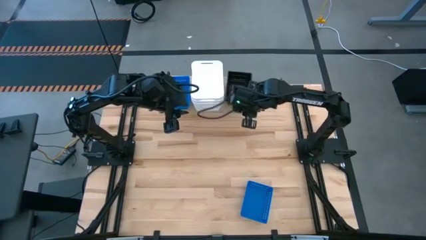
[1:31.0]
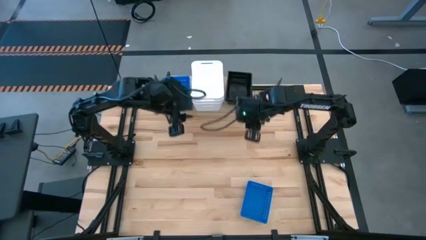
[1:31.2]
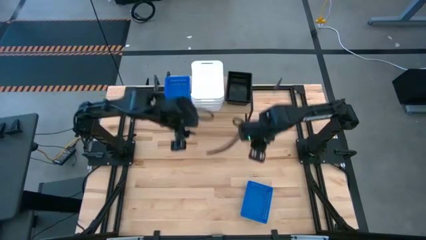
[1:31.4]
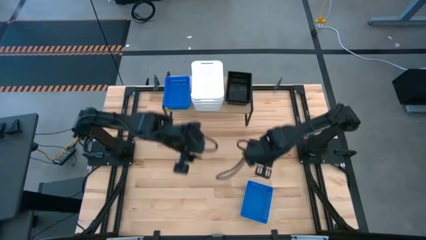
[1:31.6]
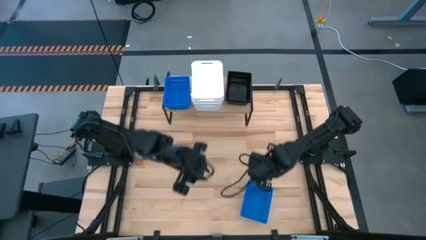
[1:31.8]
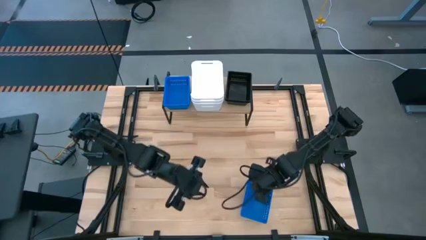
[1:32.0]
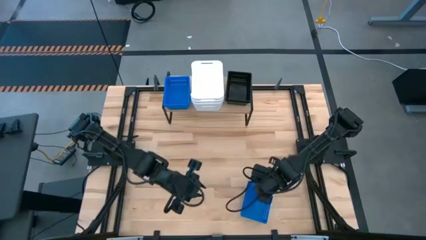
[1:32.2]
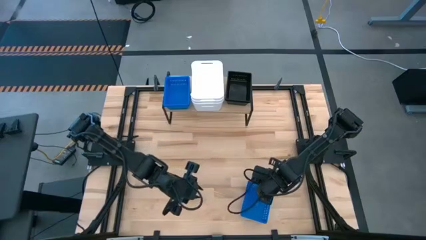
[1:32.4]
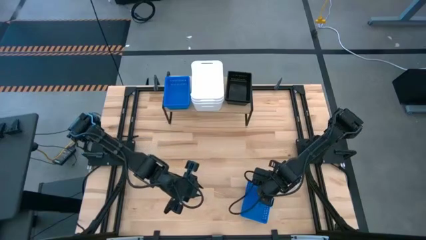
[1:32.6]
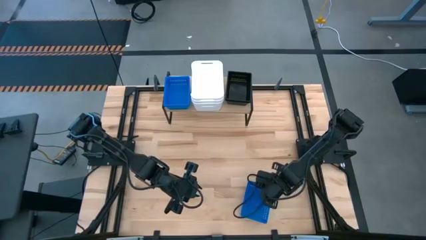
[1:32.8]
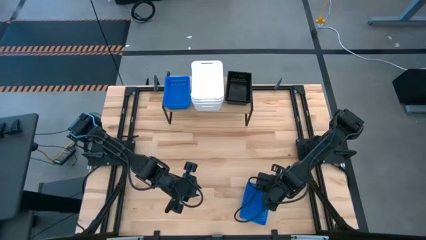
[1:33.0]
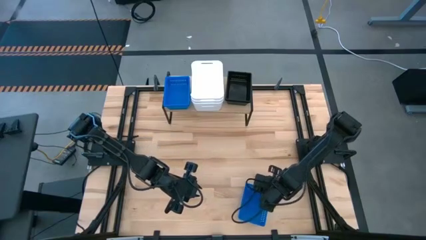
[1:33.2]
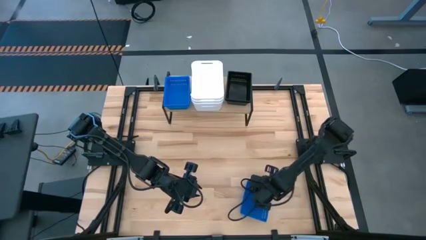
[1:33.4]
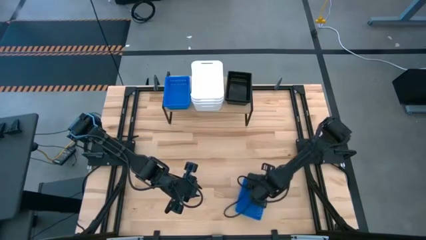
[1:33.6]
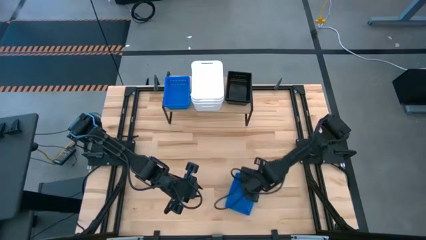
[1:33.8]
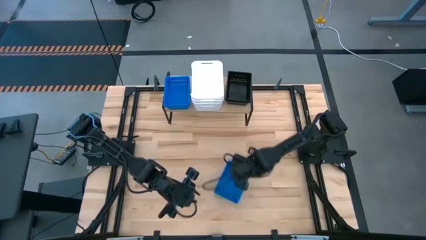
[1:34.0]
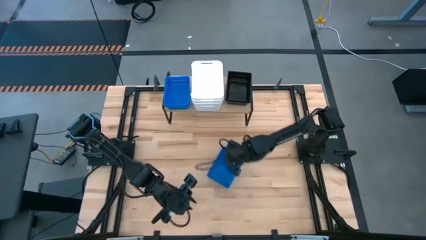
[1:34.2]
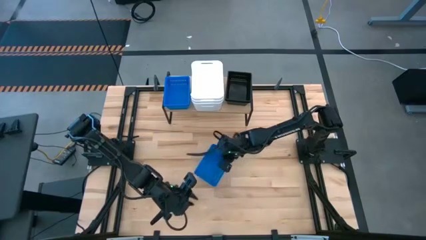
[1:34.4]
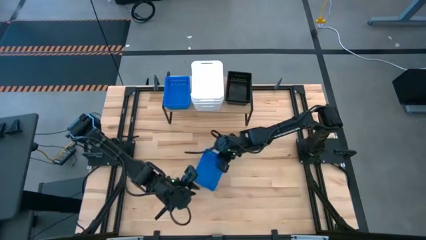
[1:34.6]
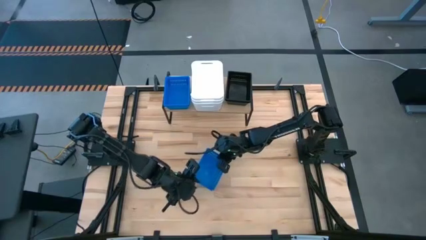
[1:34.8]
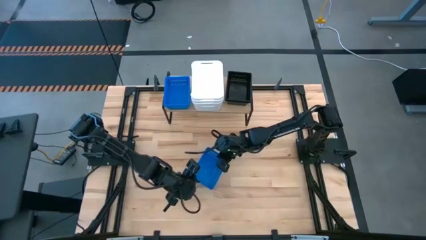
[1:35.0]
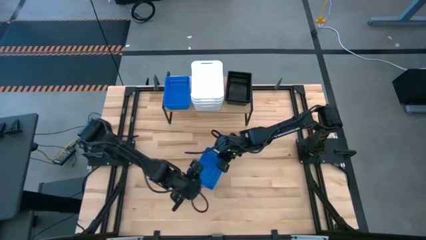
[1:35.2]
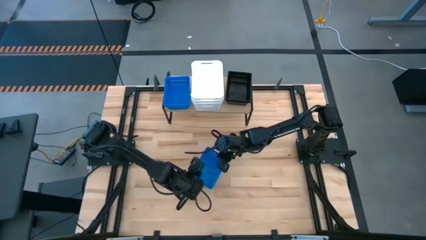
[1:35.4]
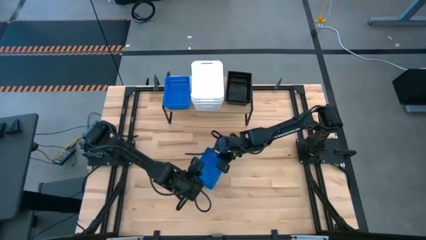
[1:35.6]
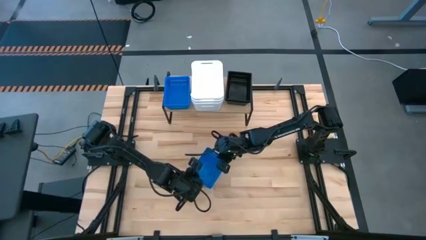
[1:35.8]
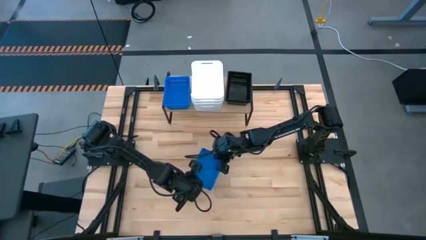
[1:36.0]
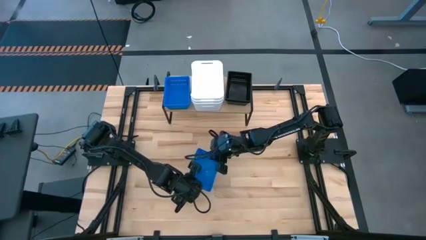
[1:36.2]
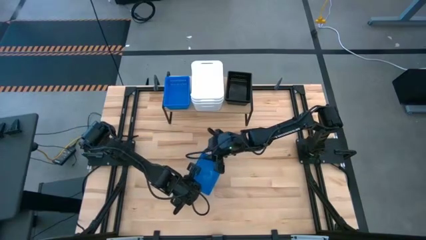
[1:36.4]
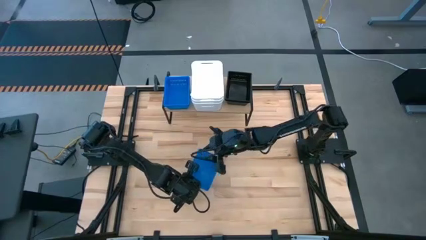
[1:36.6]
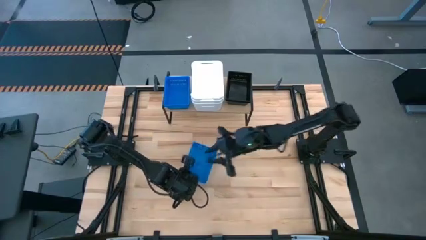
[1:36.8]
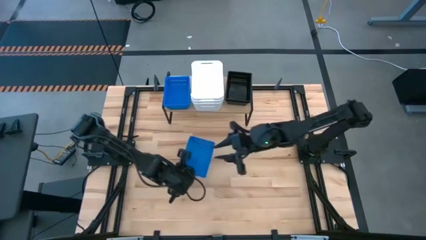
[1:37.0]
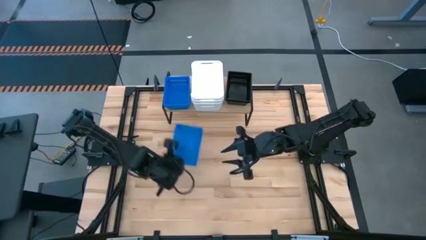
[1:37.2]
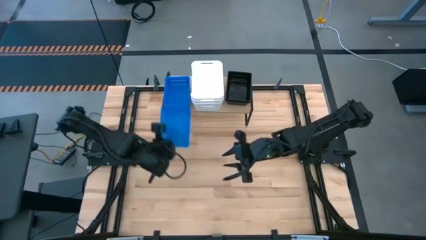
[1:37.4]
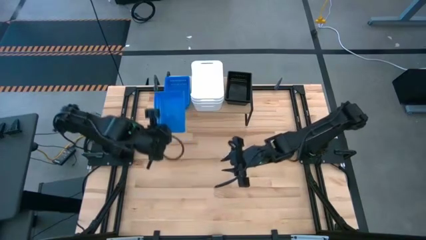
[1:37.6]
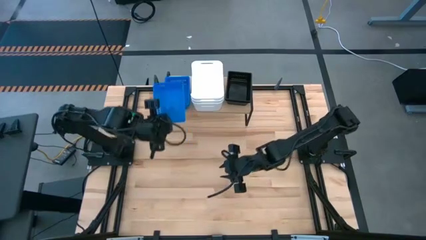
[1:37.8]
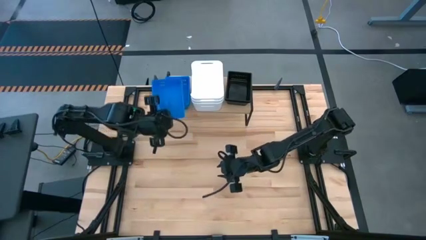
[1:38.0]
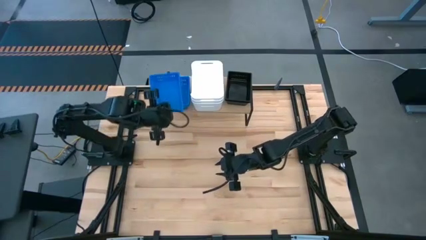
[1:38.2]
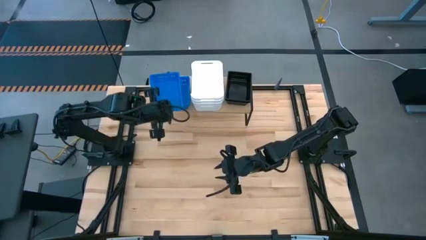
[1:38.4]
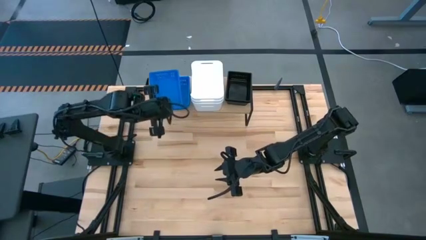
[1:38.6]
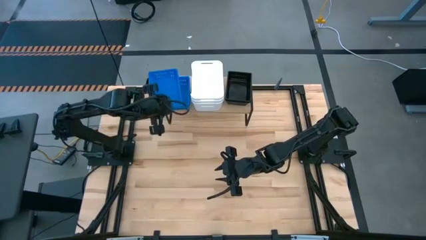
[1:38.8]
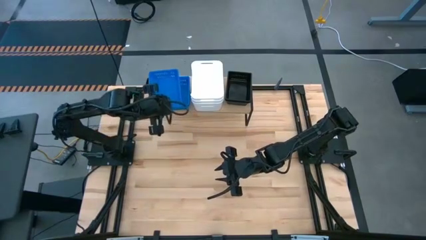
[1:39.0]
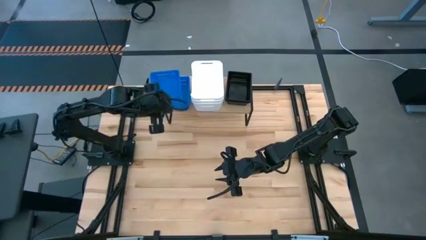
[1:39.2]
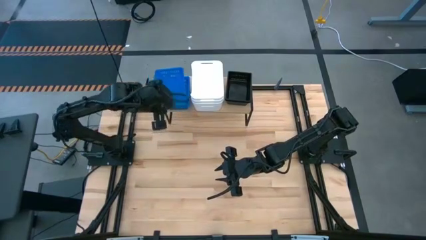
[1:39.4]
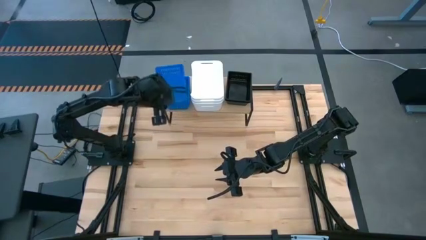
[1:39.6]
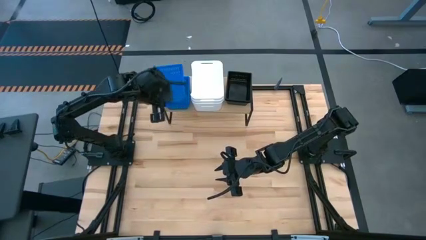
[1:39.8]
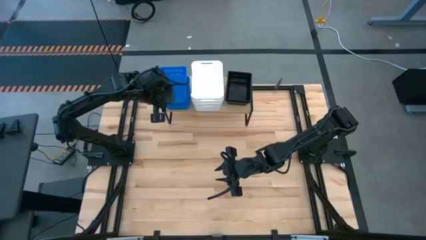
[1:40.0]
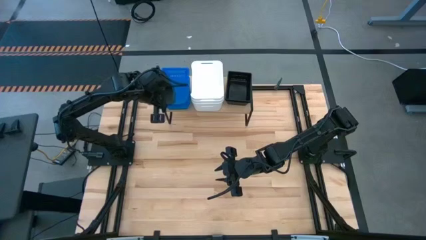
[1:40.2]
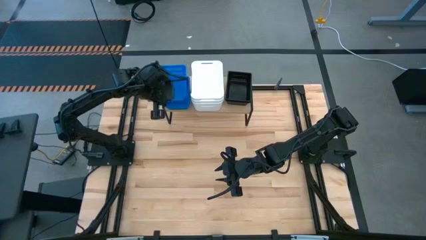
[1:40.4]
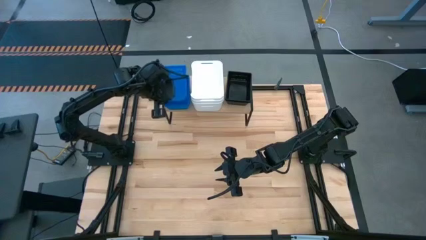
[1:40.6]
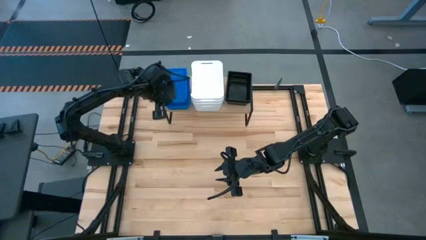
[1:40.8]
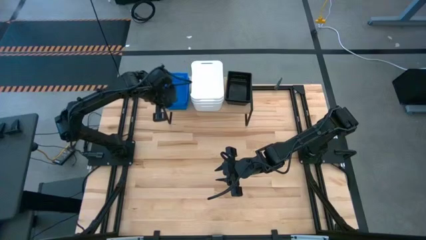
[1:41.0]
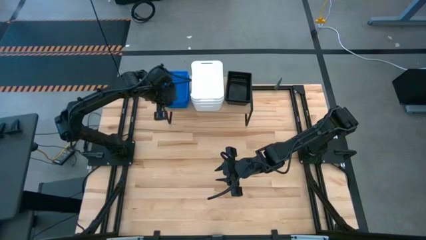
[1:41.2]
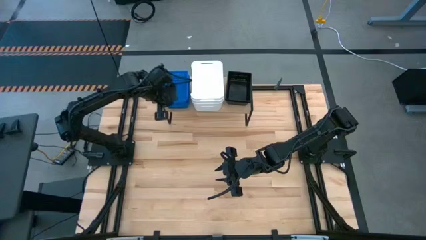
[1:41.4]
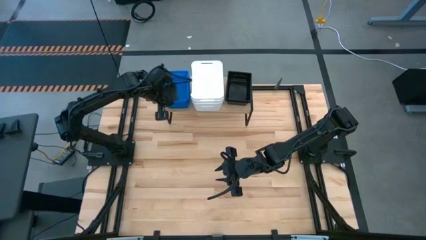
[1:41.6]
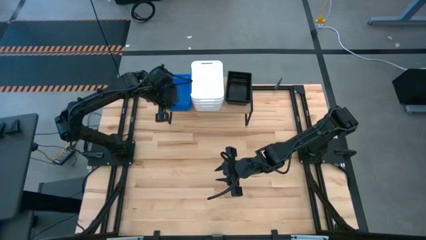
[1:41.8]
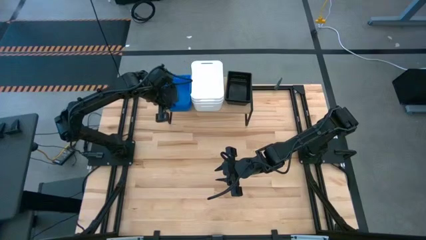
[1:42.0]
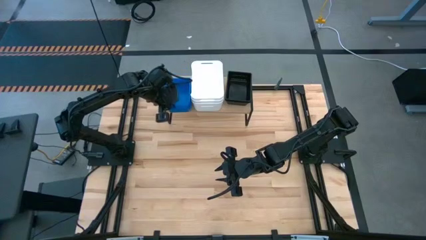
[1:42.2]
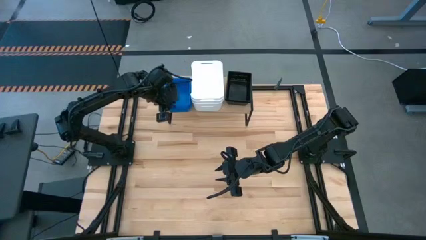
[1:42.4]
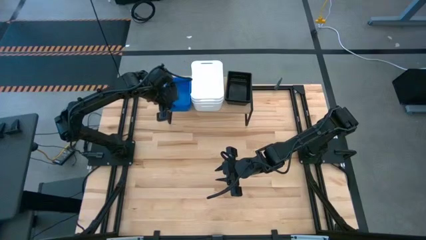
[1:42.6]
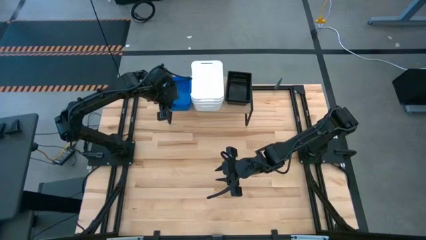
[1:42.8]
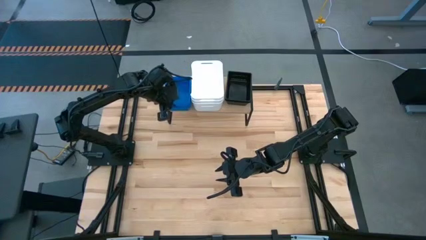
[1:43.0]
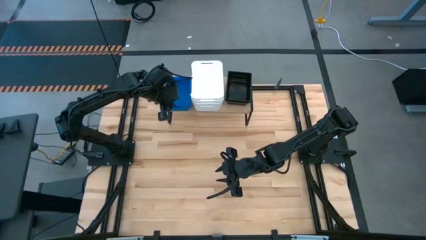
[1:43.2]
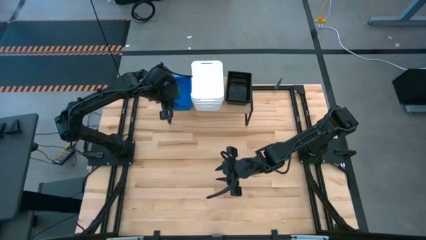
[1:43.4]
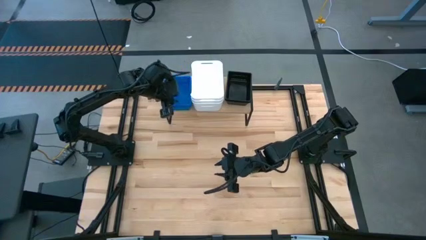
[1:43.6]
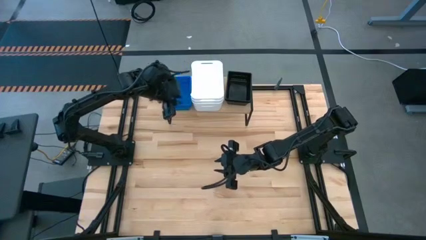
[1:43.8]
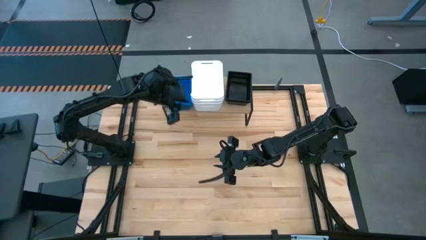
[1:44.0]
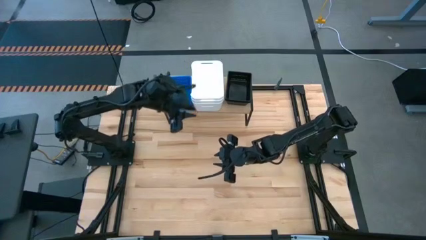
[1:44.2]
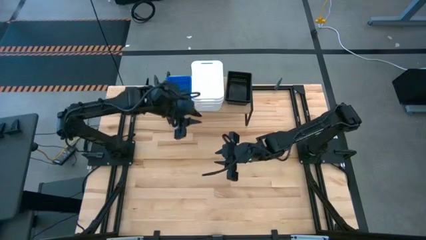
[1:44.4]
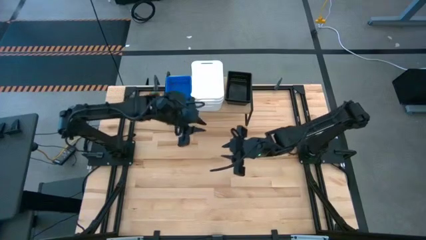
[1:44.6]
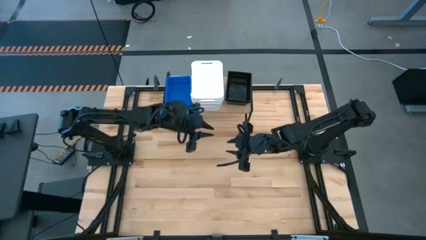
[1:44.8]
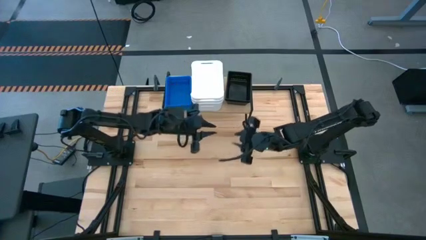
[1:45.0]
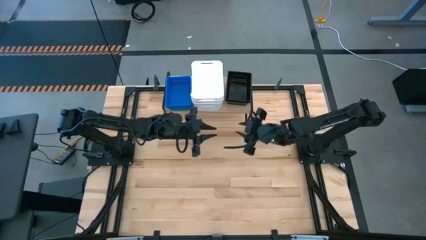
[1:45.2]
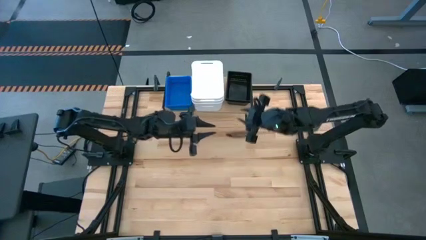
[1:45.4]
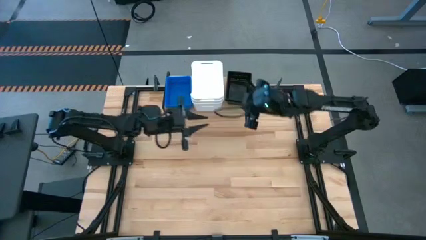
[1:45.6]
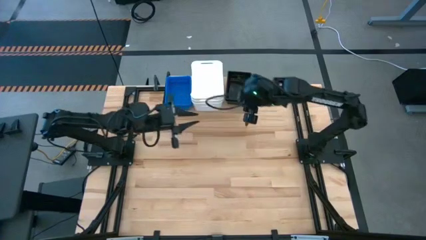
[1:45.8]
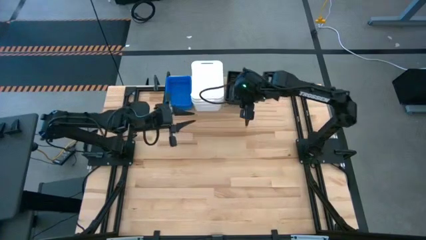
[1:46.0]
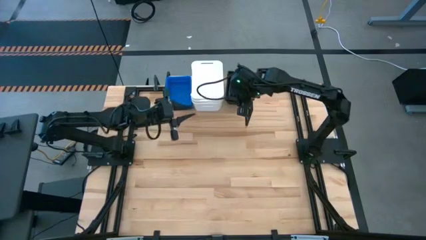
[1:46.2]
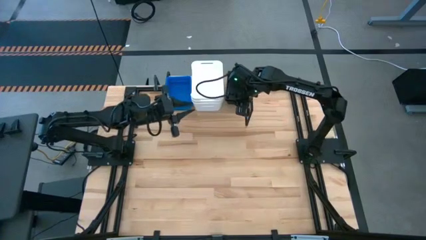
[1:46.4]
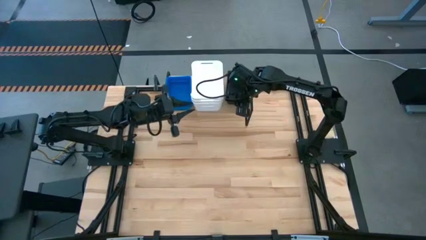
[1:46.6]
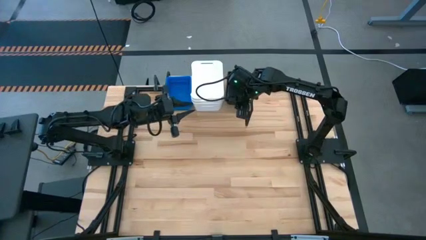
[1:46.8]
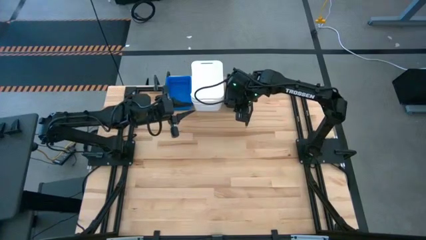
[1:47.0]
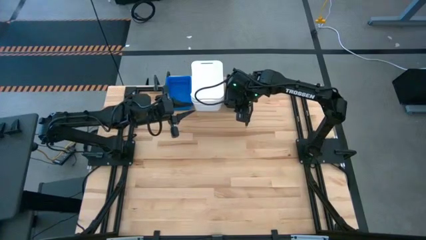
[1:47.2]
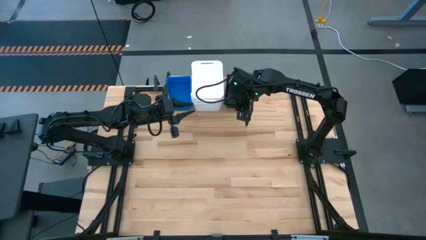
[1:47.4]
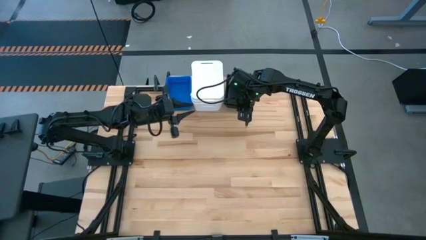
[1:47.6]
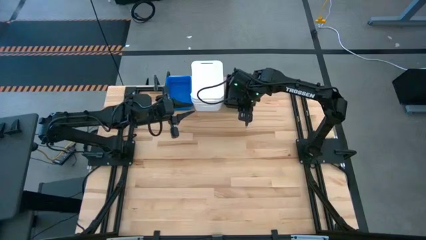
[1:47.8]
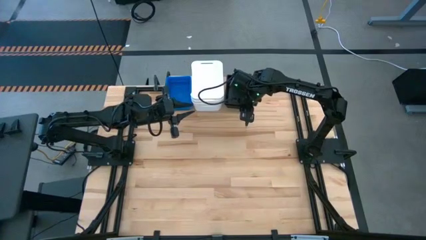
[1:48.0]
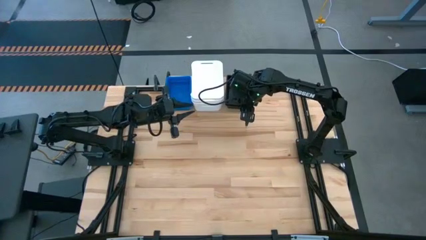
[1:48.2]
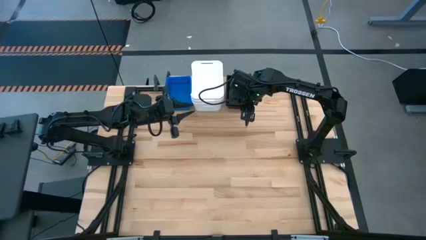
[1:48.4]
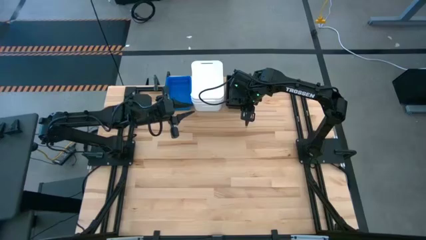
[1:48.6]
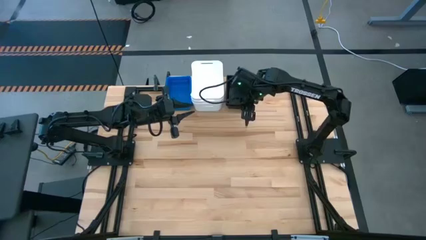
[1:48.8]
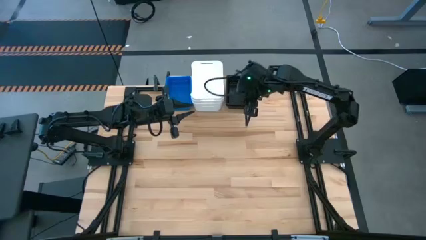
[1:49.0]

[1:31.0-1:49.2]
Task: Stack baskets on shelf by color
Stack the blue bin into the blue bin on the shelf
